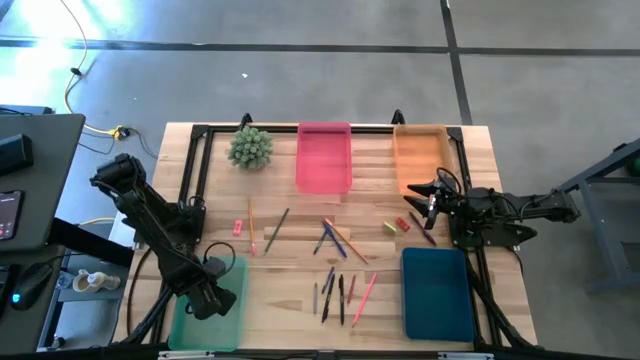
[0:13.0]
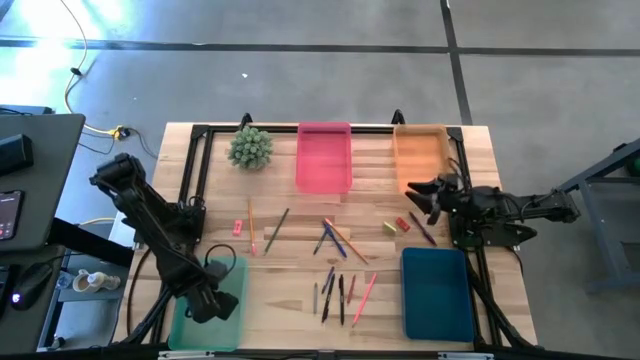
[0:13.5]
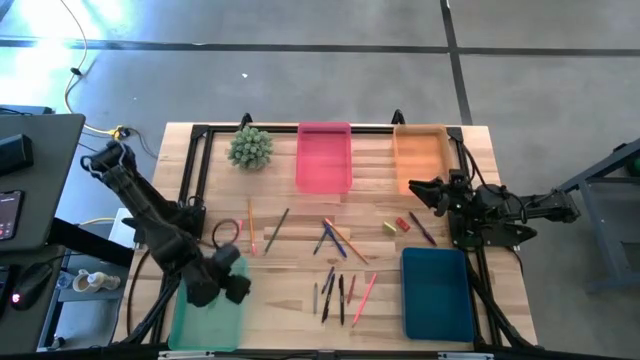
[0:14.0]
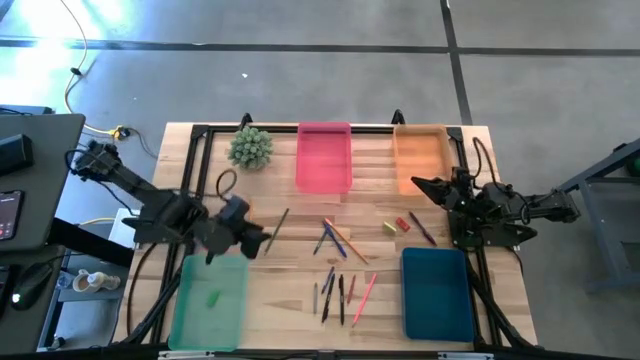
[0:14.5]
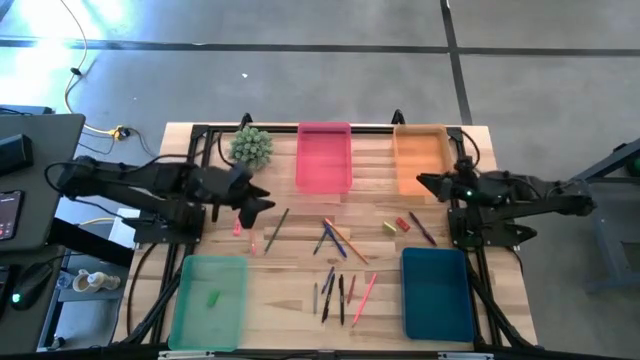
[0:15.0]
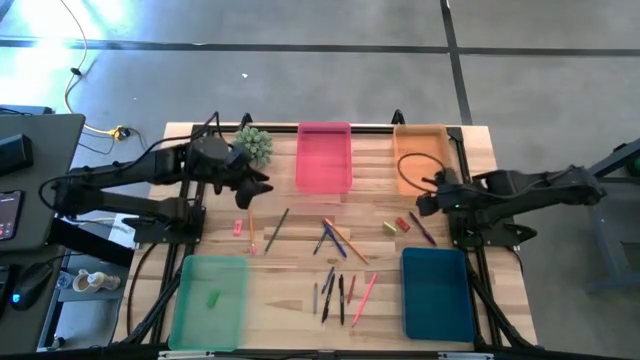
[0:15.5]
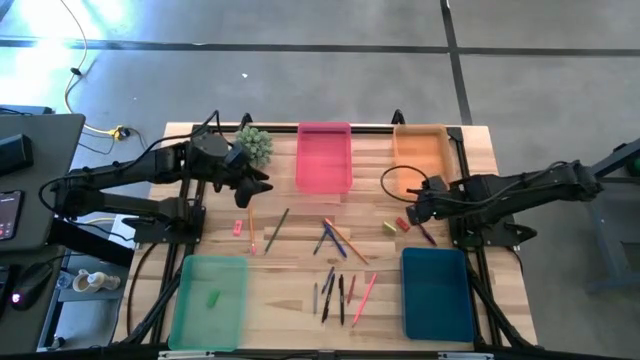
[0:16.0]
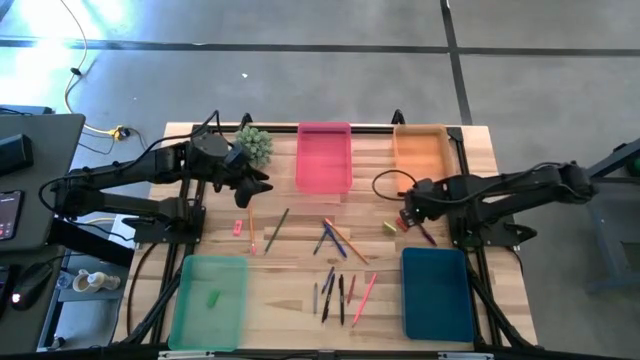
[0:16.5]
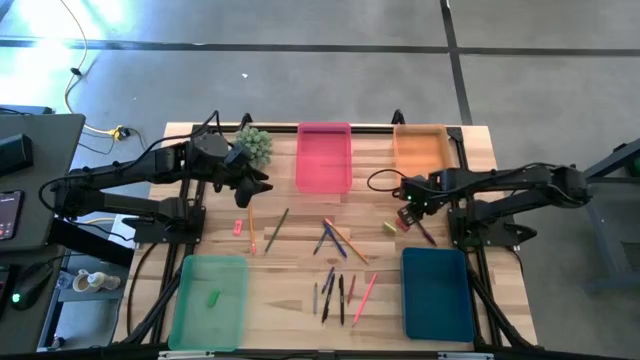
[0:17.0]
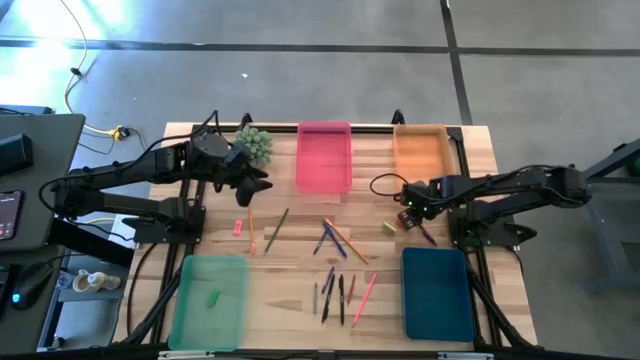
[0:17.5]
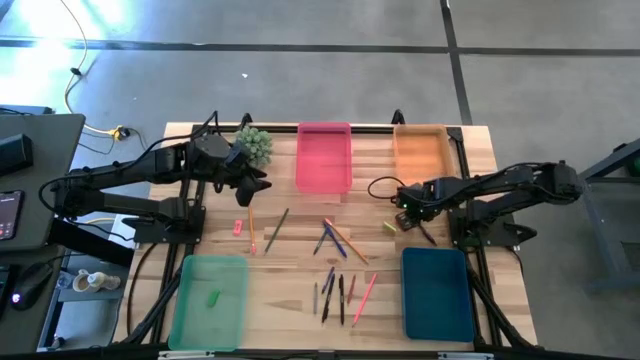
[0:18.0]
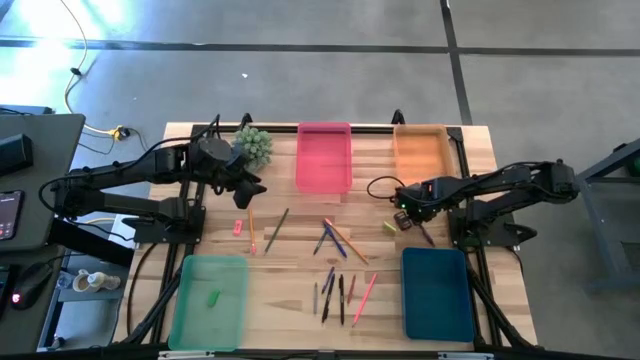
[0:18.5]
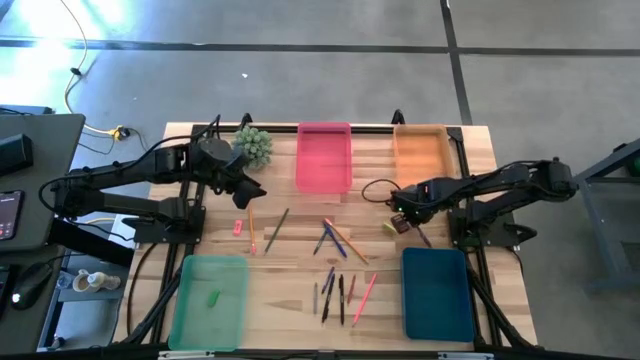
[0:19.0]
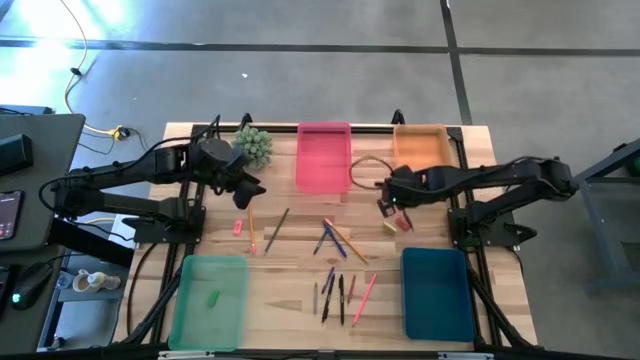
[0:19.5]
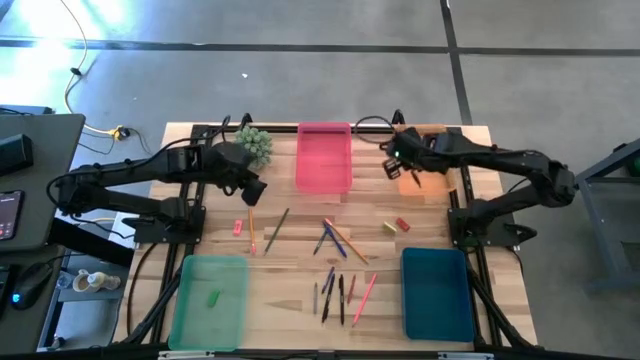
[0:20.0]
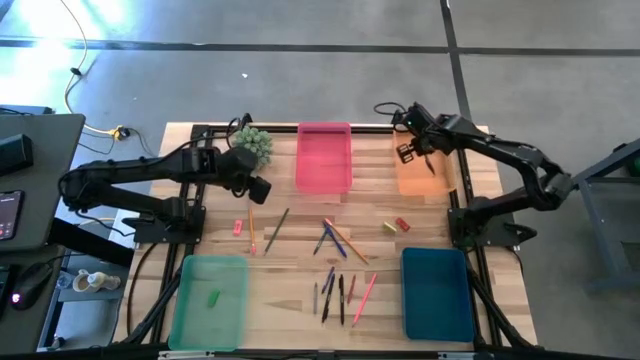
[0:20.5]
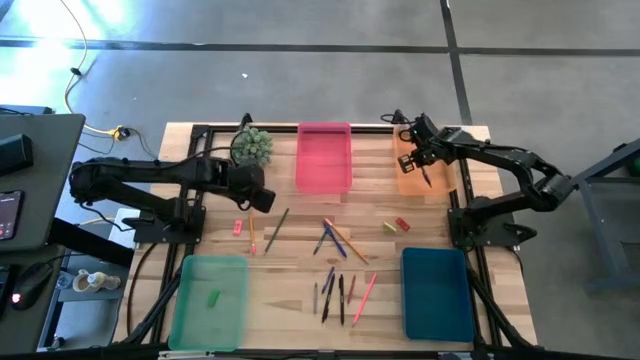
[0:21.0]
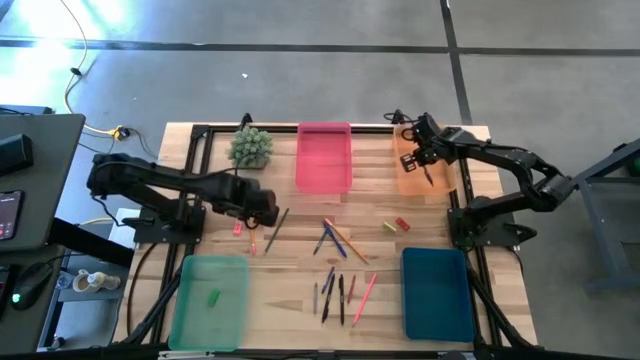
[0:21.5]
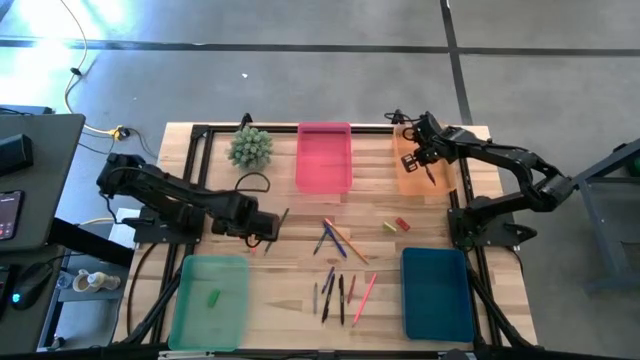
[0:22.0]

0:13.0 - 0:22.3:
Task: Sort crayons/erasers/pens/pencils in bins
Put the purple pen into the orange bin

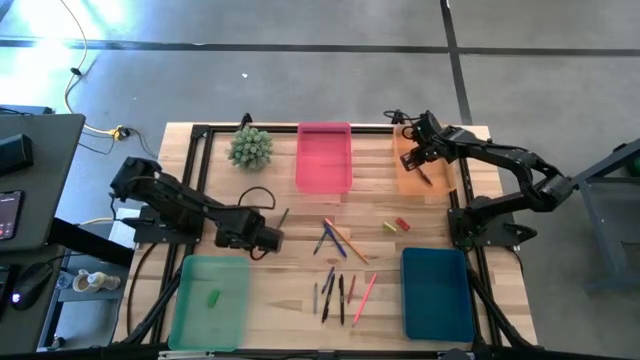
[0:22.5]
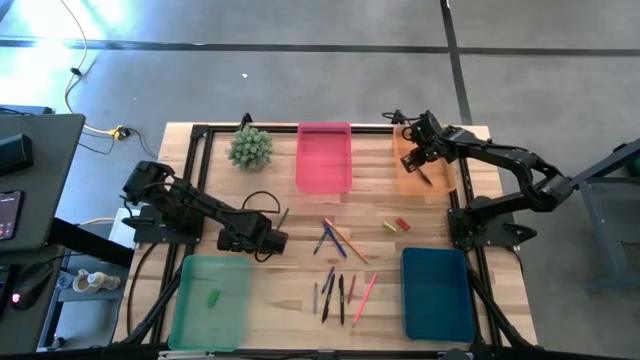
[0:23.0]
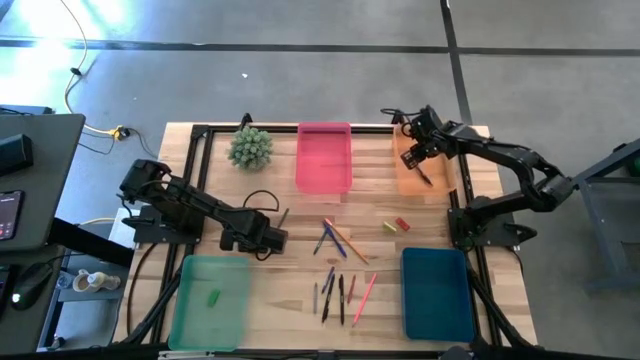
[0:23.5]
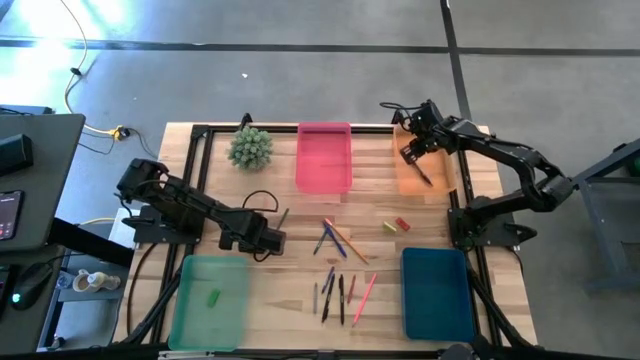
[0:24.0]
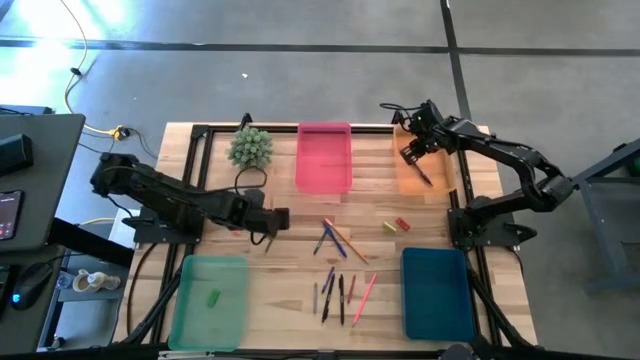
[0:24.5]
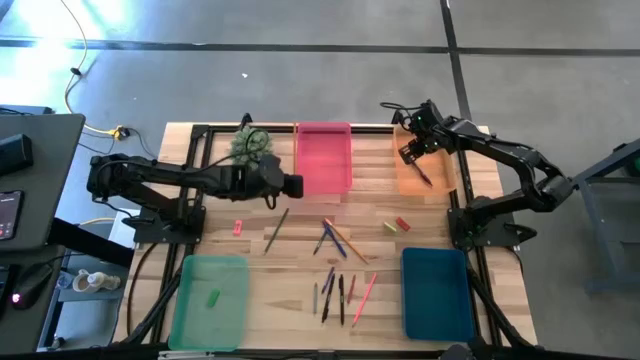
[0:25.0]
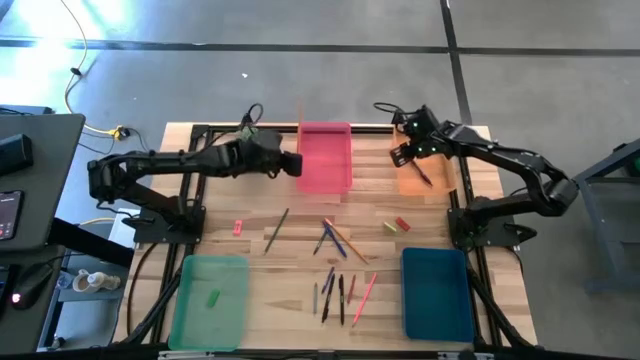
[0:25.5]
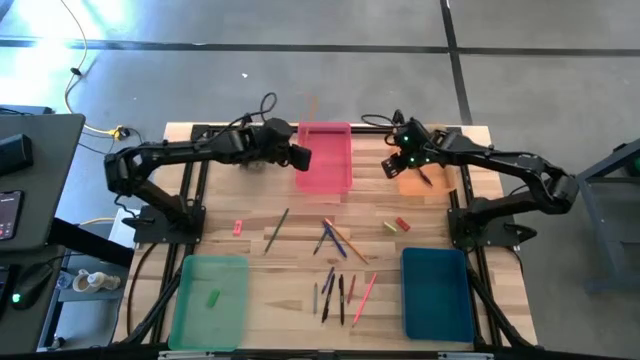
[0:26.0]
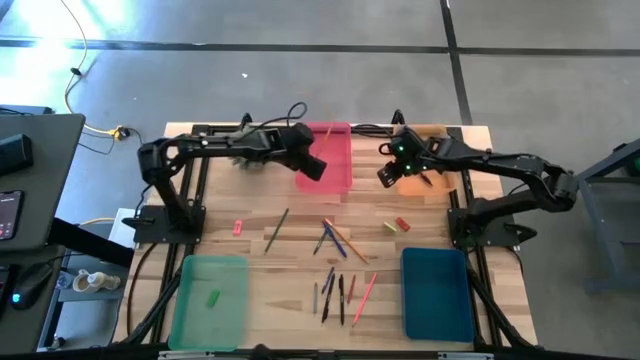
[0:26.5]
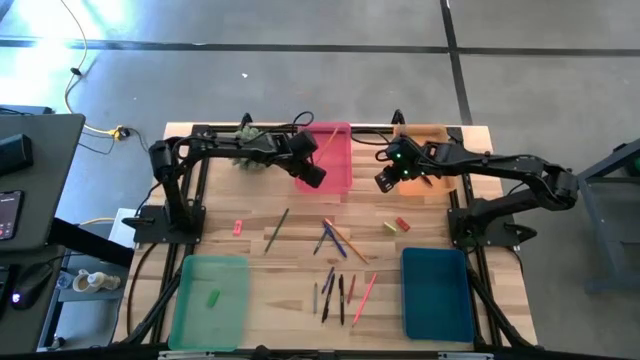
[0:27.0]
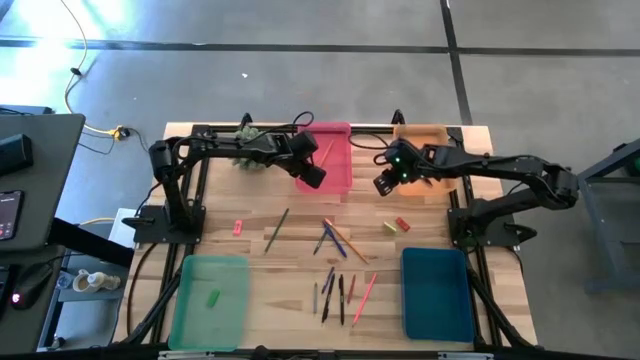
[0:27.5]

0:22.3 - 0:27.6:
Put the left yellow pencil with the eraser into the red bin

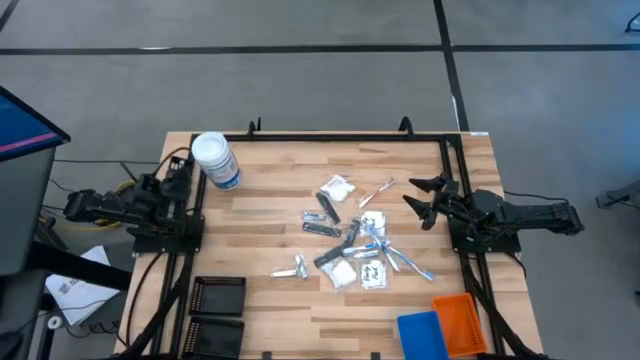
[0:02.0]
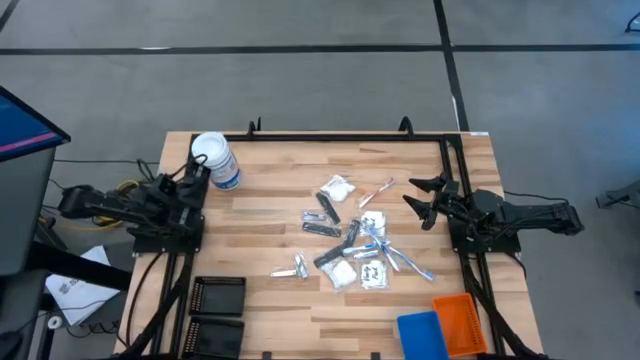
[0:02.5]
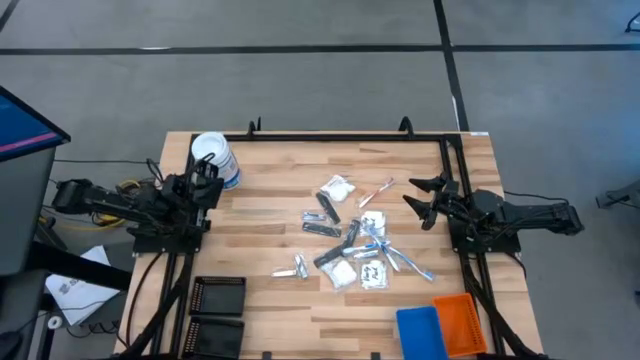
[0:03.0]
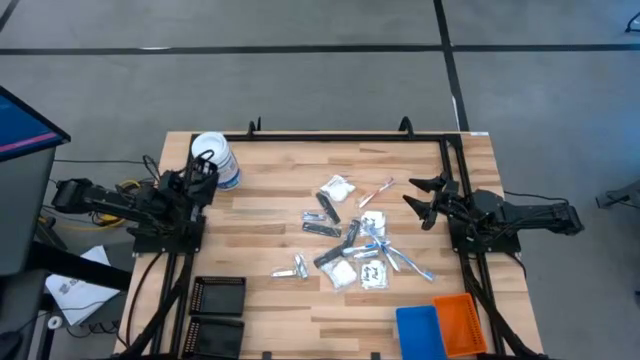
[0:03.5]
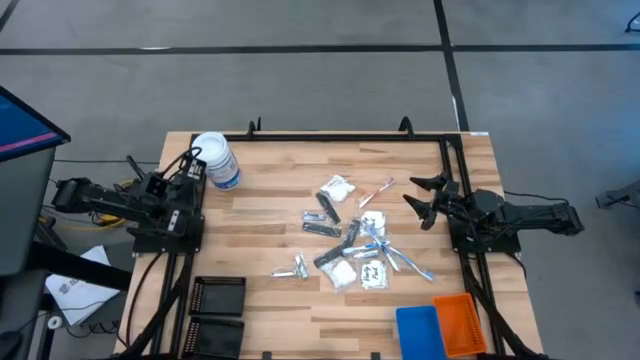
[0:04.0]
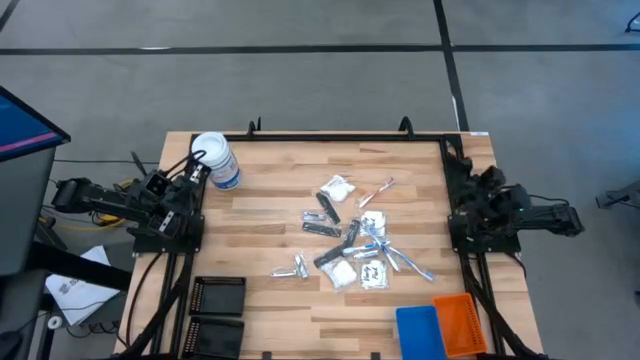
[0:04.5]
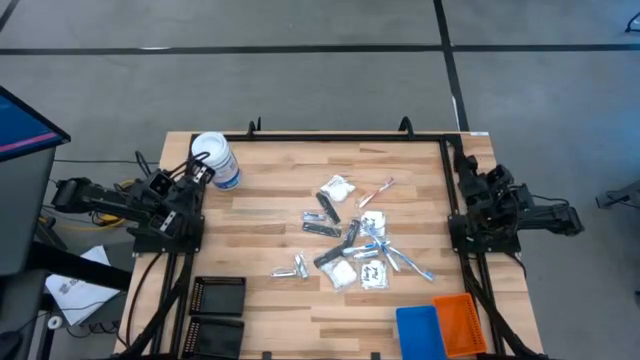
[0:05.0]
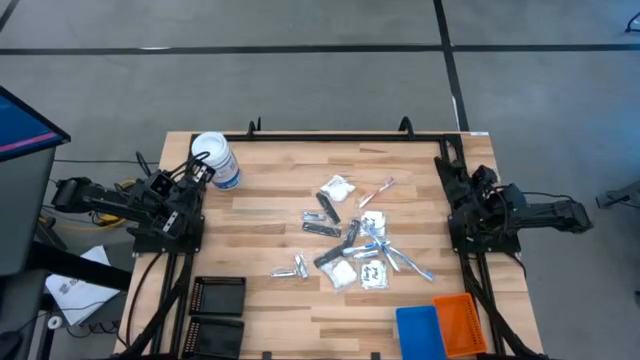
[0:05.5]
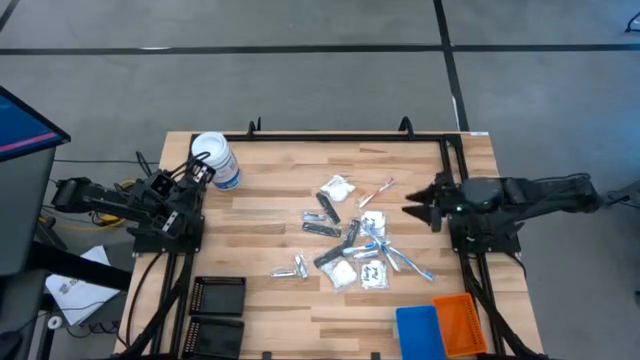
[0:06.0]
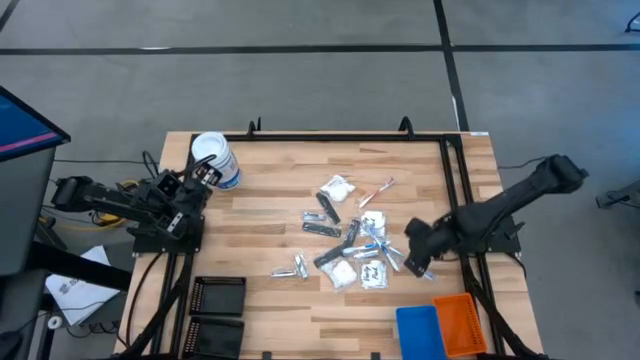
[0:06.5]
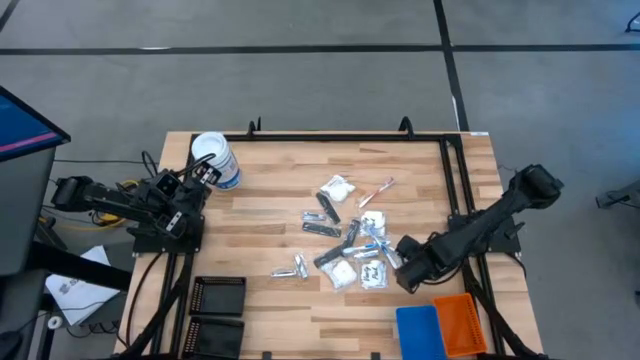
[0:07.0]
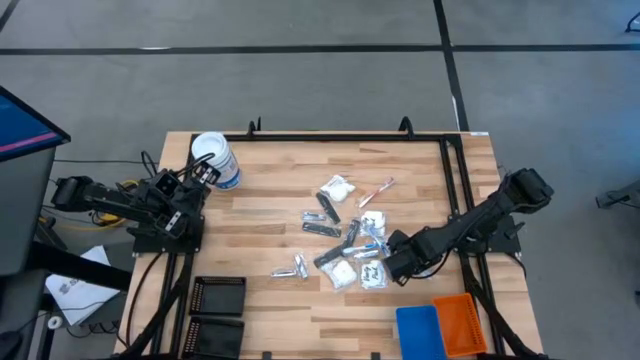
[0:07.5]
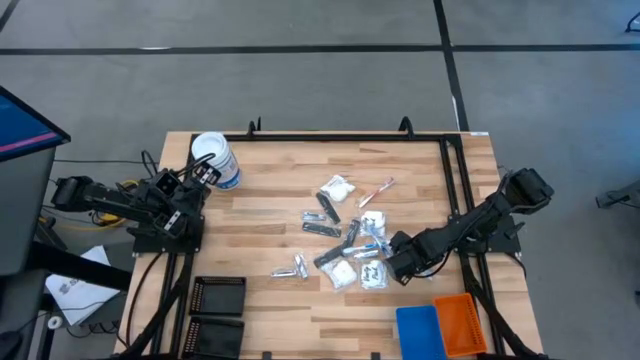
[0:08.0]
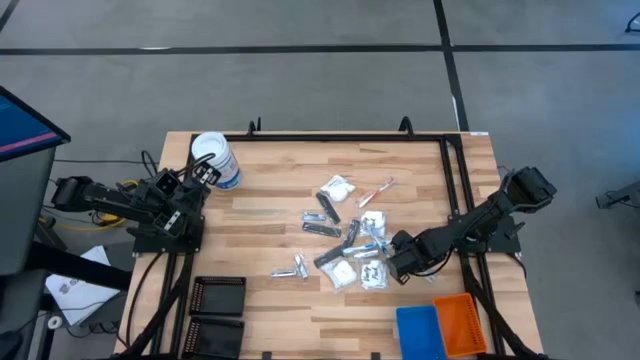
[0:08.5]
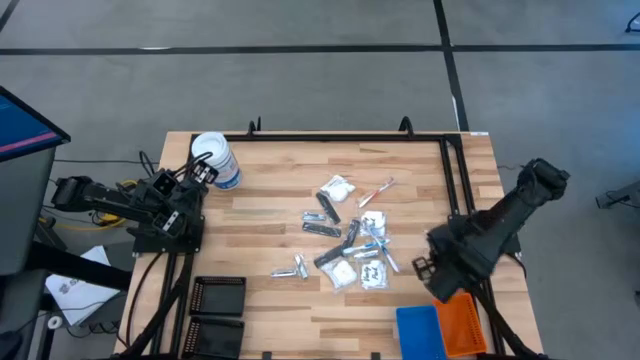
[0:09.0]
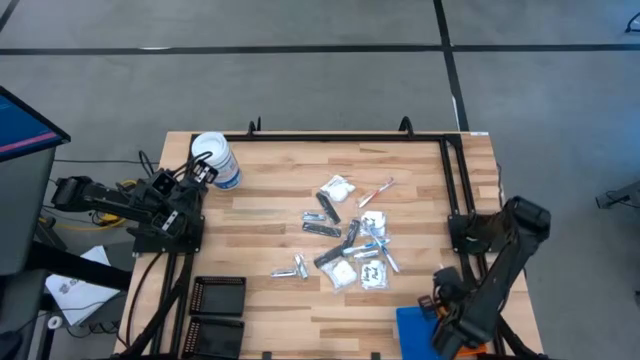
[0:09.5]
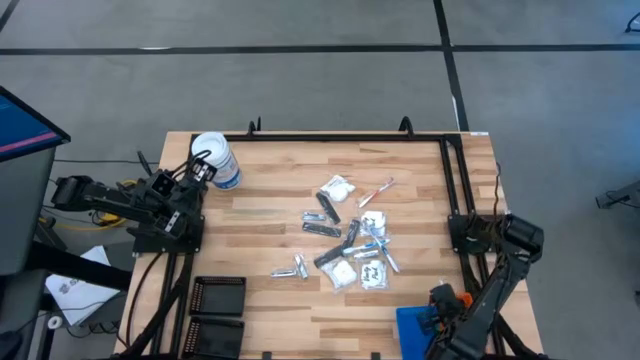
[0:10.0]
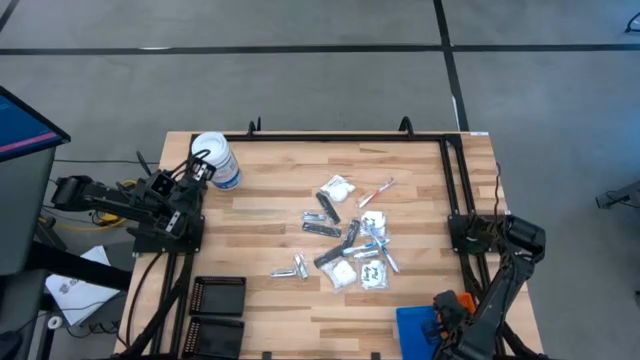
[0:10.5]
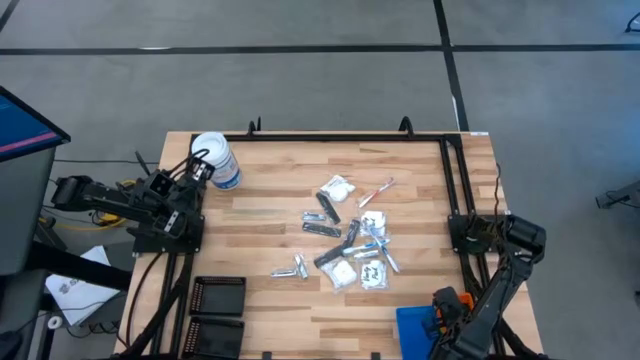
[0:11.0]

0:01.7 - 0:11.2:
Task: Pick & Place Travel size toiletries
Put the light blue toothbrush into the orange bin
